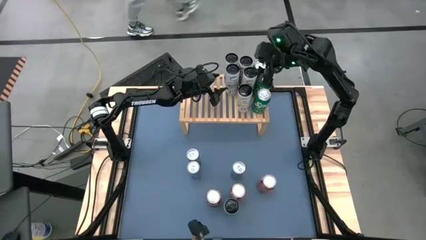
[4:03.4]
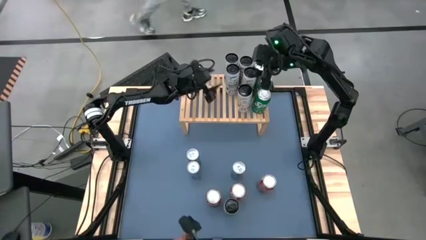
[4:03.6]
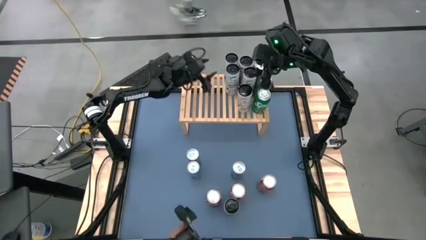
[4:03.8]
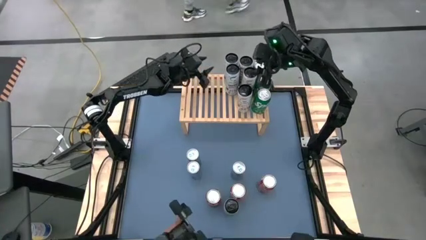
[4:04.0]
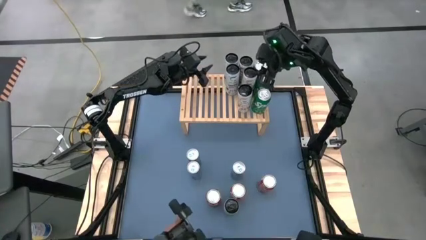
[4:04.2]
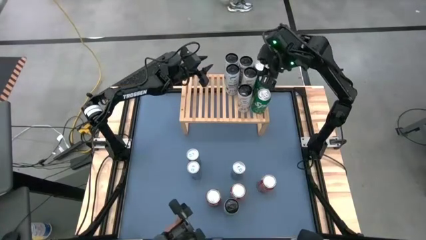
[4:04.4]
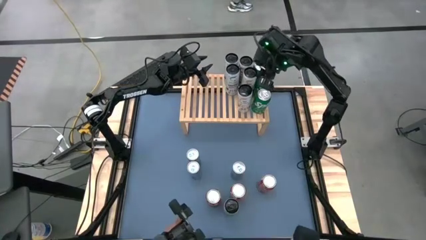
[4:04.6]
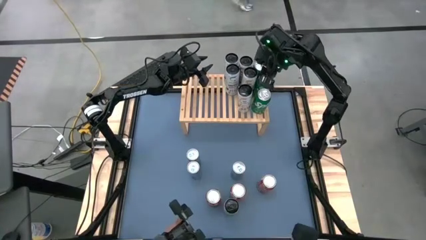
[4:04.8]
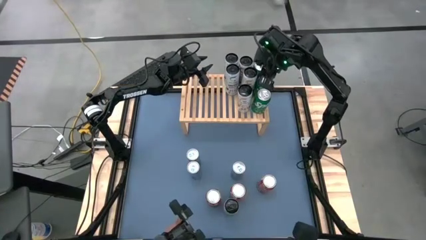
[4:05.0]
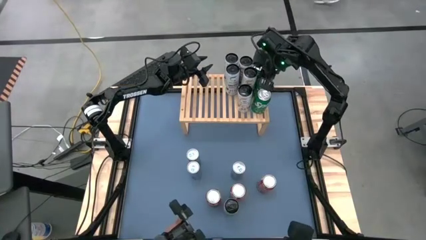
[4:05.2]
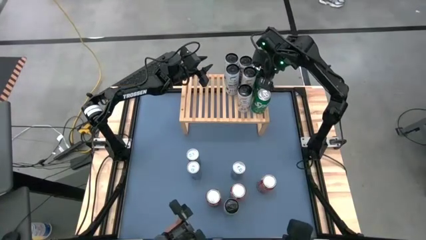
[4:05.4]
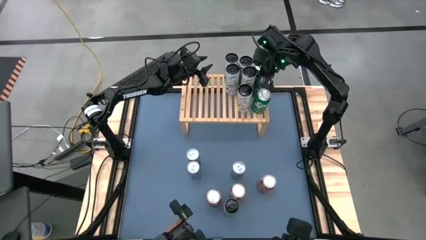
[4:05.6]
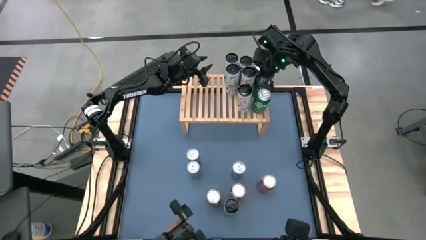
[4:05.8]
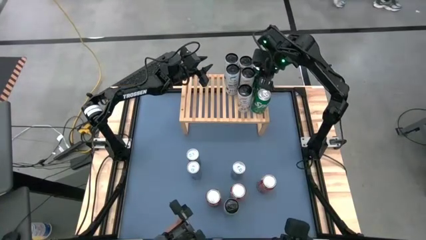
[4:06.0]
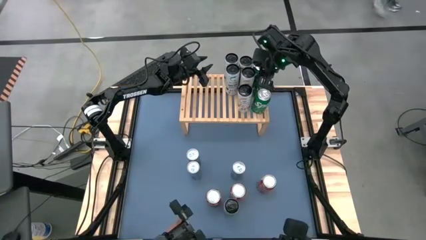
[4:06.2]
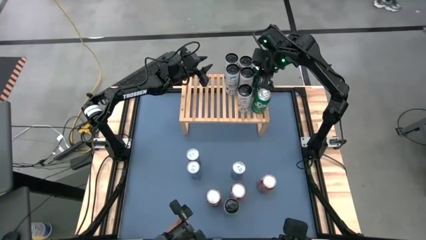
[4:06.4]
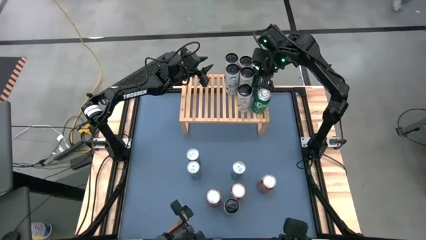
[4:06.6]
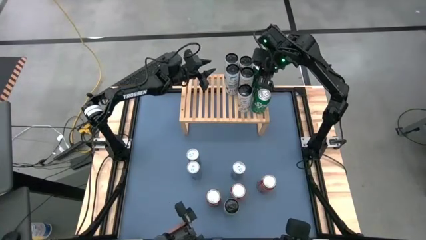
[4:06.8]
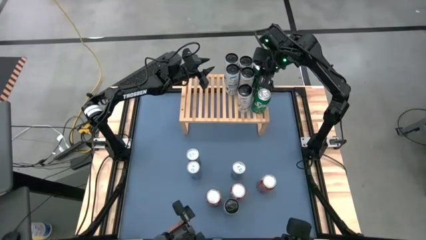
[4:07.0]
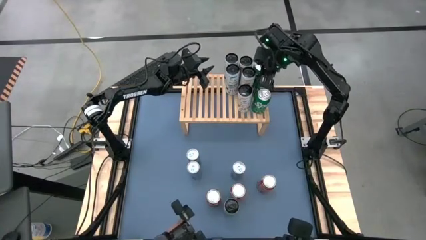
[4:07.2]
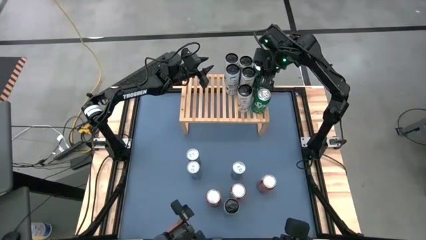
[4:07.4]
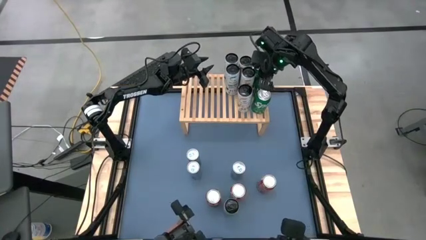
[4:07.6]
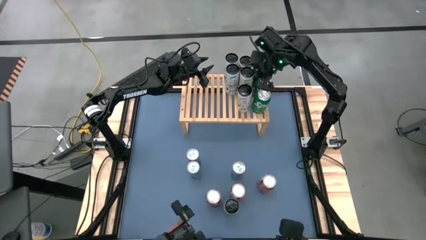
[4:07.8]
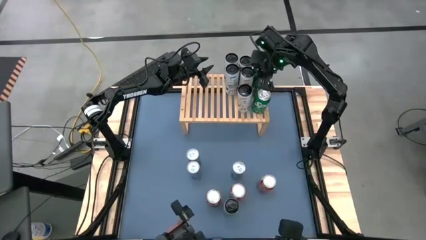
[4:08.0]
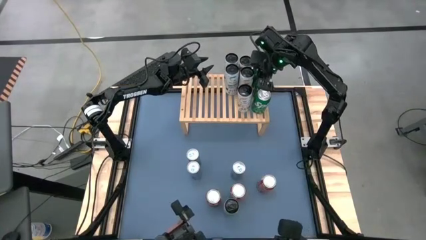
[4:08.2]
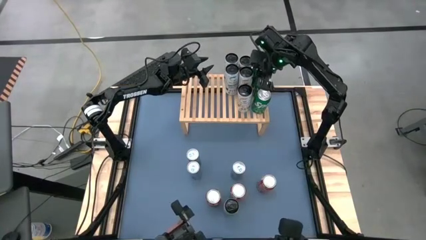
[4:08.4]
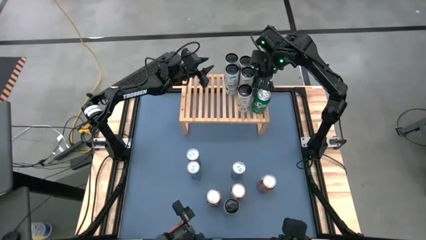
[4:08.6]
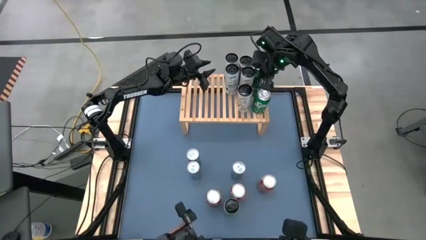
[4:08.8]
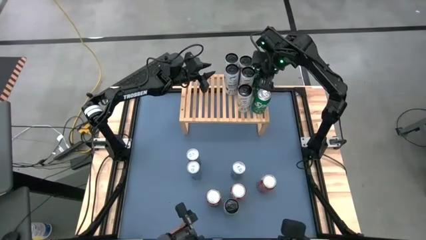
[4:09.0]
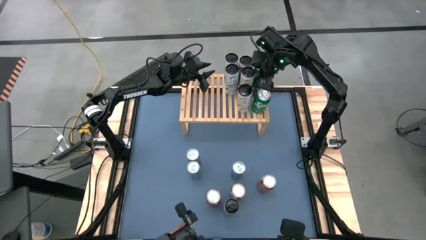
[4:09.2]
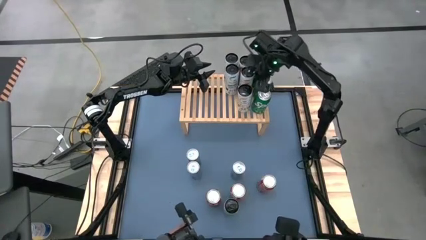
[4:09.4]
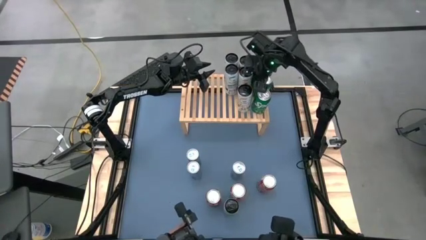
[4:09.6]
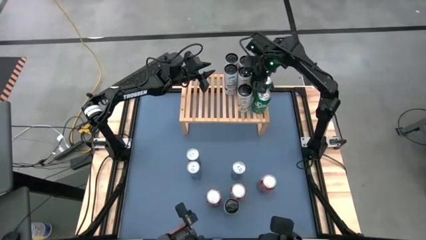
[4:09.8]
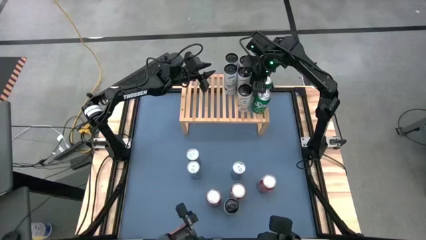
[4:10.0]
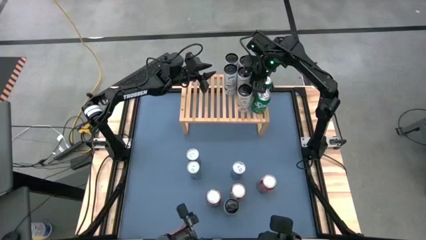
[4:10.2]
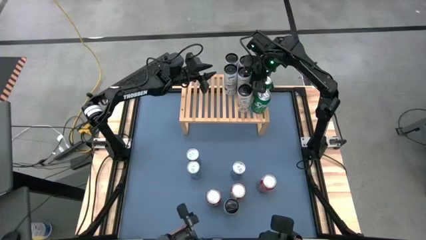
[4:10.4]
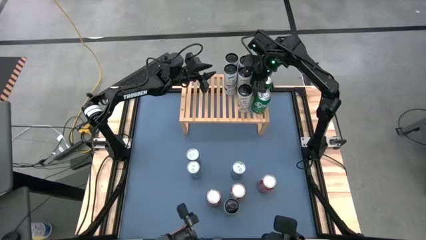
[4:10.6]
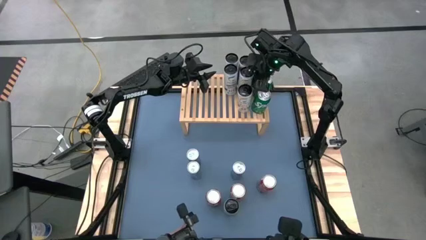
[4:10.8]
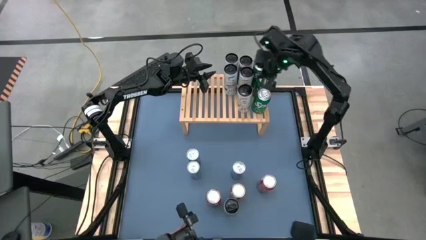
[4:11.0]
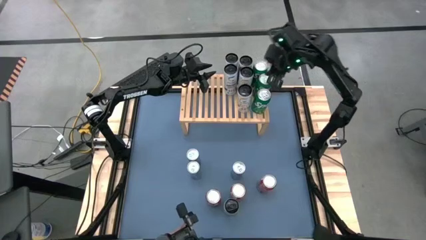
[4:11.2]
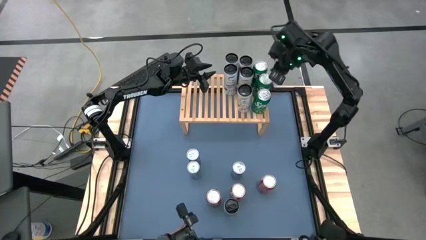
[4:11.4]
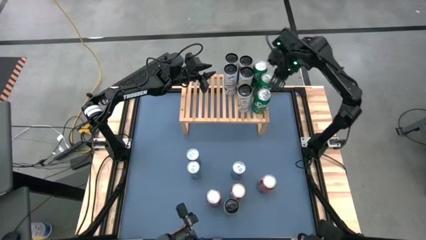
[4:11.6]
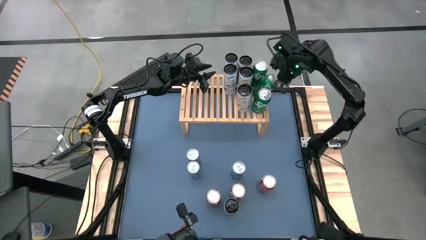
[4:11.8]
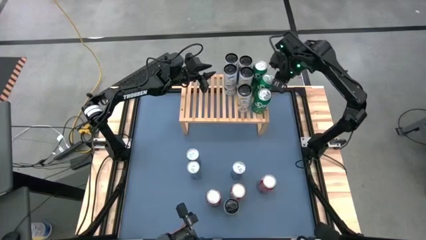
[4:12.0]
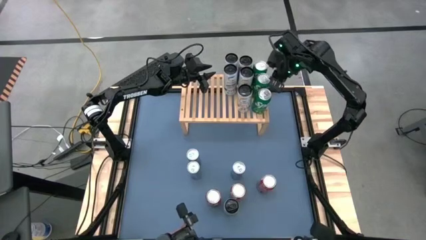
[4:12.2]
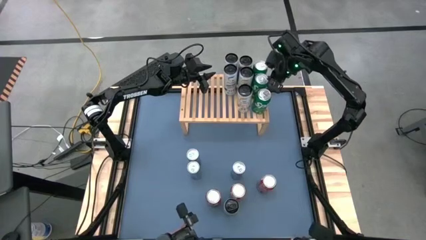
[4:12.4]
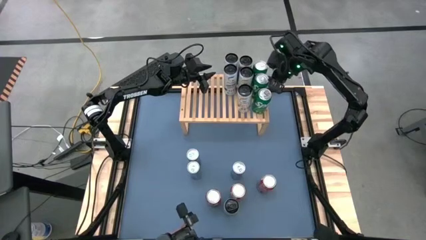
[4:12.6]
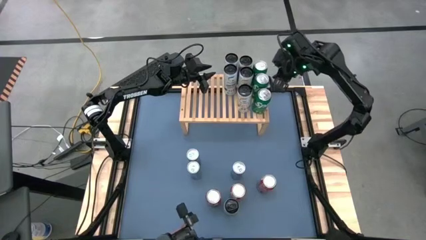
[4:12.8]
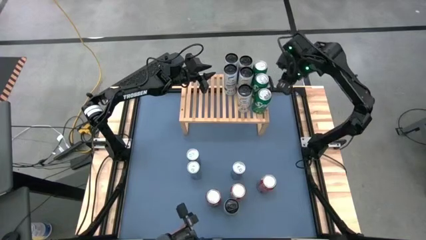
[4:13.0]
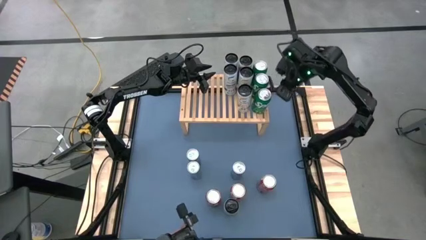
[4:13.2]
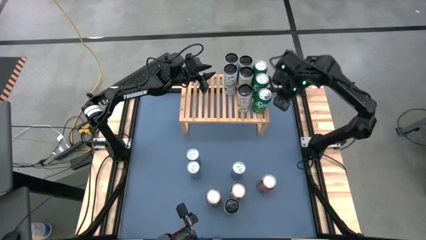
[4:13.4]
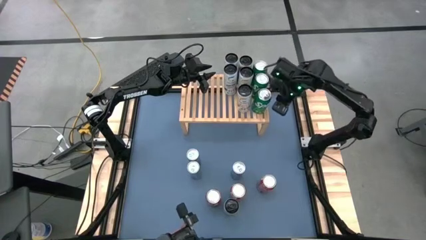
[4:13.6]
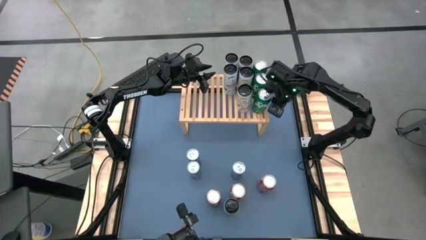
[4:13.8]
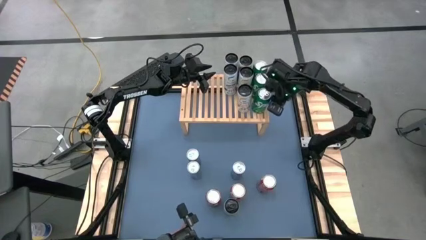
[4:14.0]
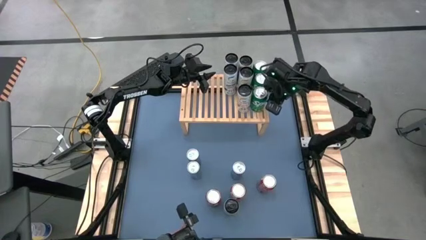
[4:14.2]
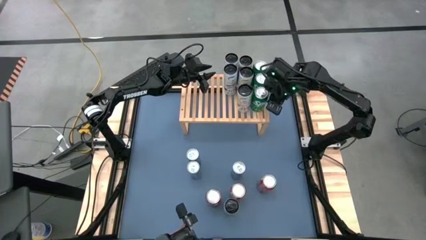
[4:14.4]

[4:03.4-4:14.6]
Task: Place canned beverage on shelf
Adjust the soda cans on the shelf
